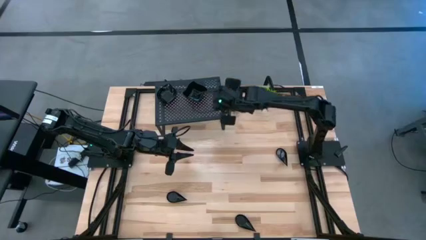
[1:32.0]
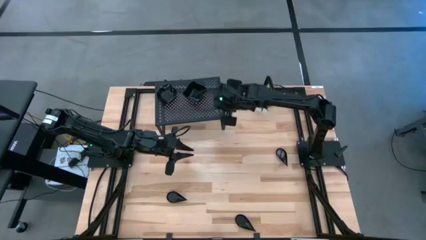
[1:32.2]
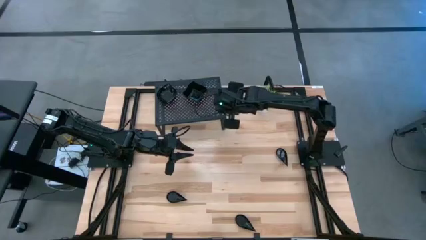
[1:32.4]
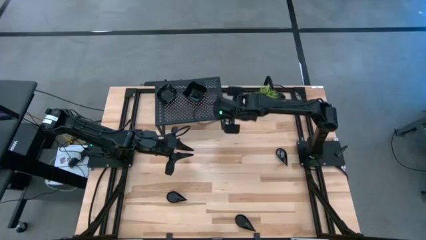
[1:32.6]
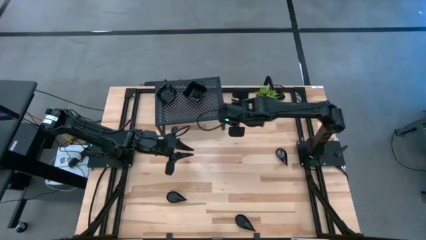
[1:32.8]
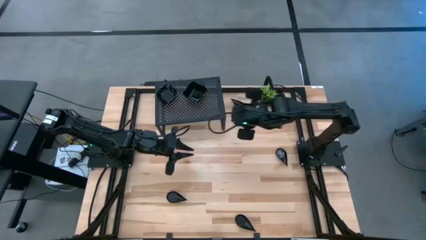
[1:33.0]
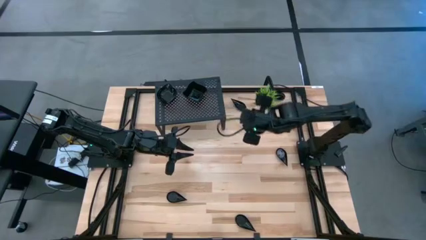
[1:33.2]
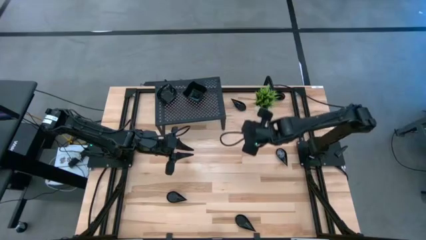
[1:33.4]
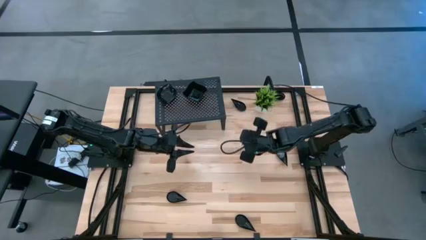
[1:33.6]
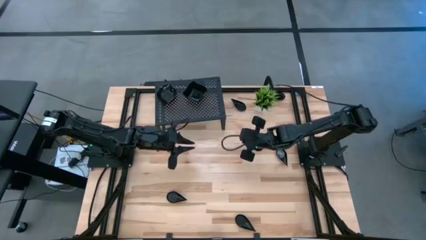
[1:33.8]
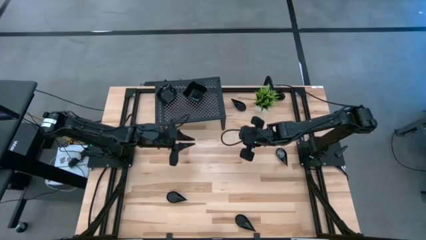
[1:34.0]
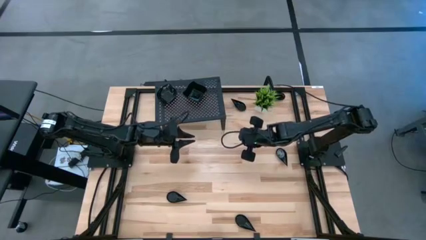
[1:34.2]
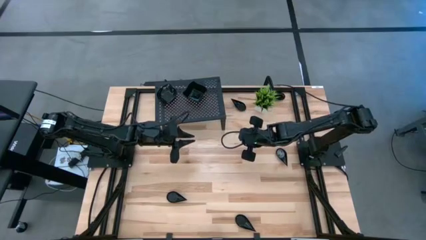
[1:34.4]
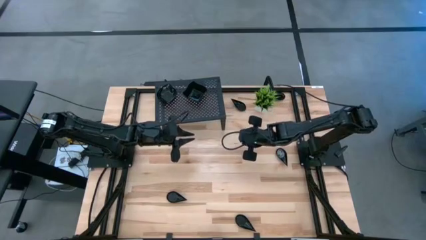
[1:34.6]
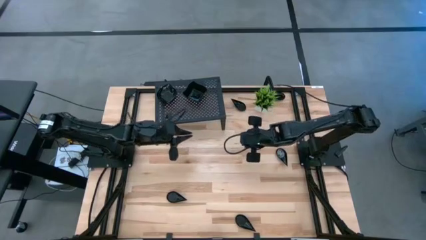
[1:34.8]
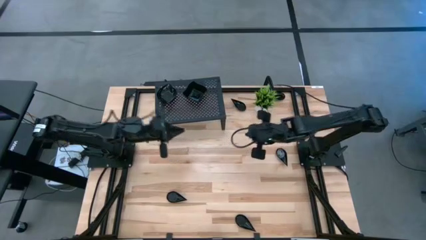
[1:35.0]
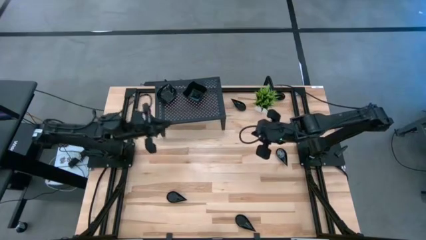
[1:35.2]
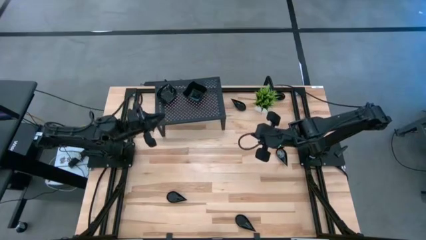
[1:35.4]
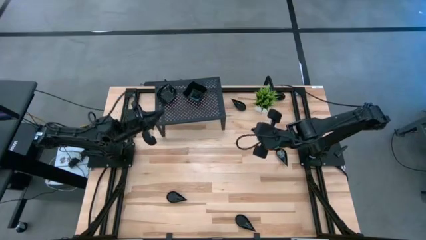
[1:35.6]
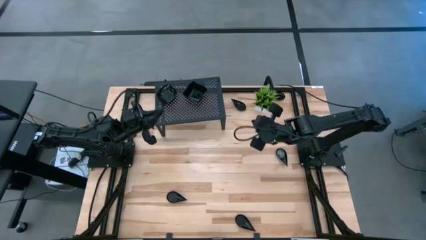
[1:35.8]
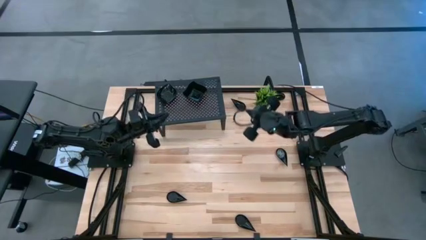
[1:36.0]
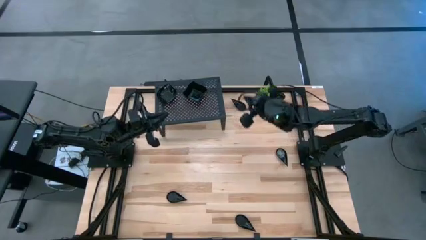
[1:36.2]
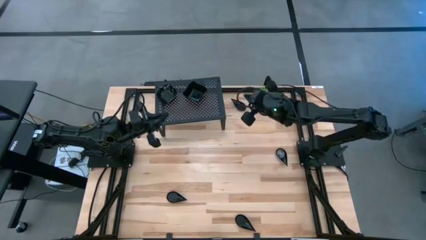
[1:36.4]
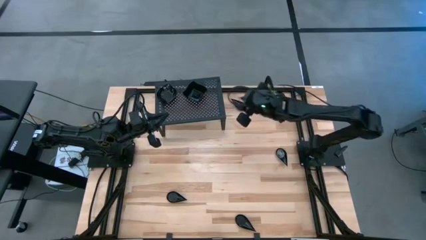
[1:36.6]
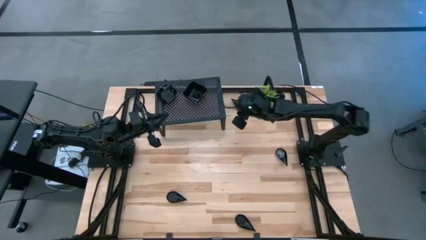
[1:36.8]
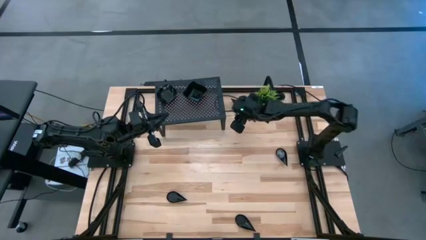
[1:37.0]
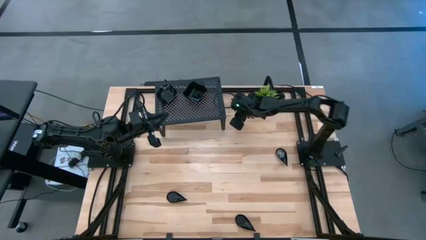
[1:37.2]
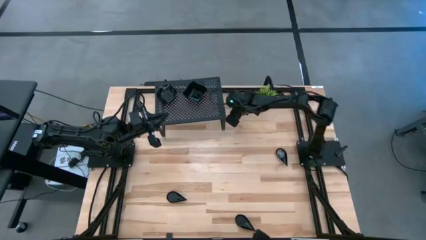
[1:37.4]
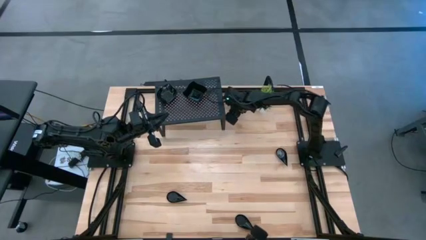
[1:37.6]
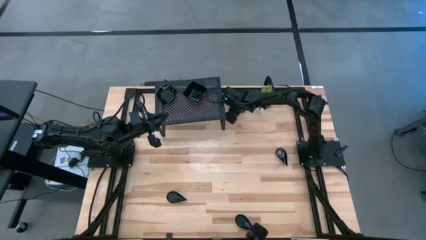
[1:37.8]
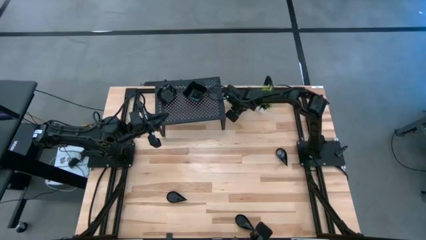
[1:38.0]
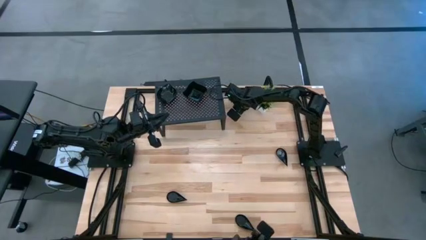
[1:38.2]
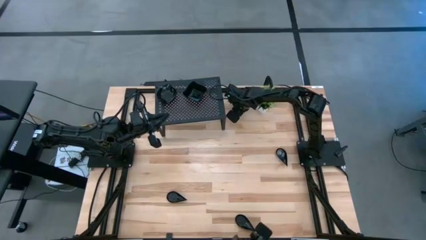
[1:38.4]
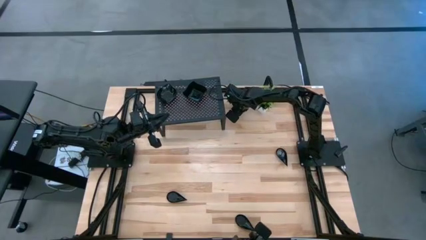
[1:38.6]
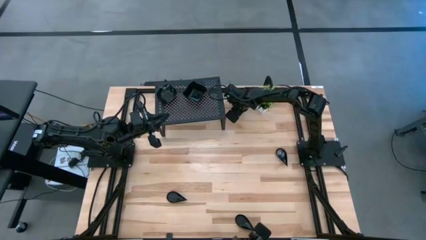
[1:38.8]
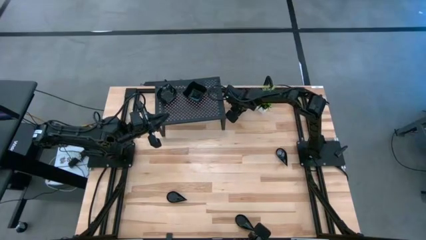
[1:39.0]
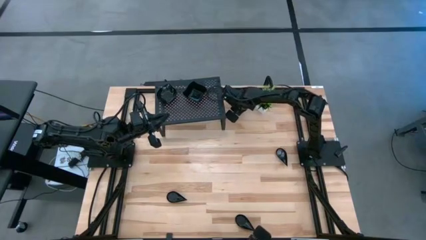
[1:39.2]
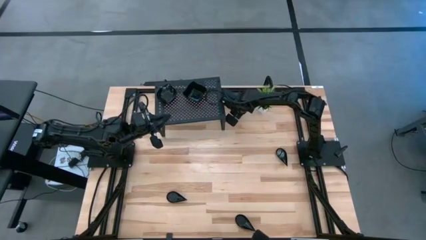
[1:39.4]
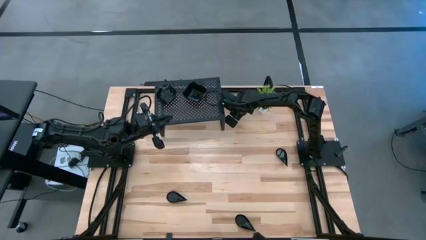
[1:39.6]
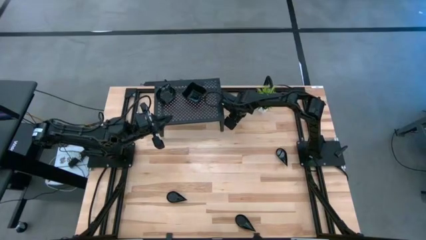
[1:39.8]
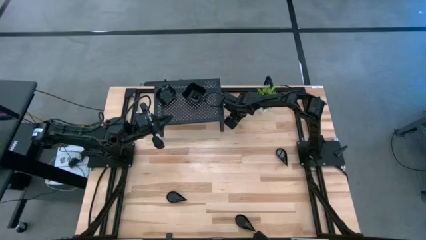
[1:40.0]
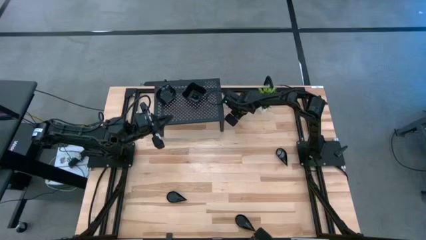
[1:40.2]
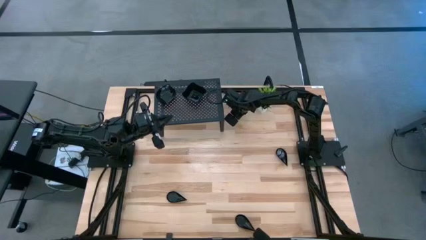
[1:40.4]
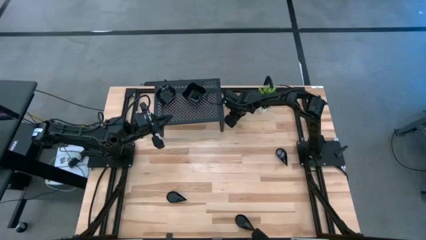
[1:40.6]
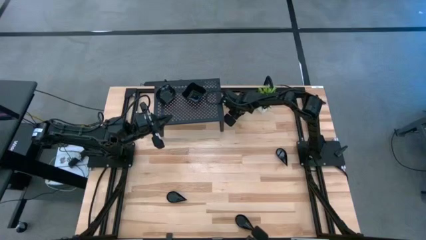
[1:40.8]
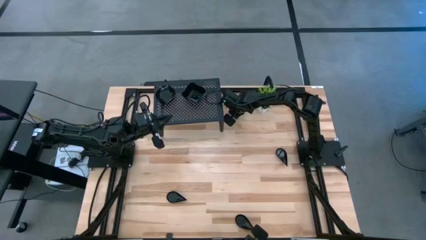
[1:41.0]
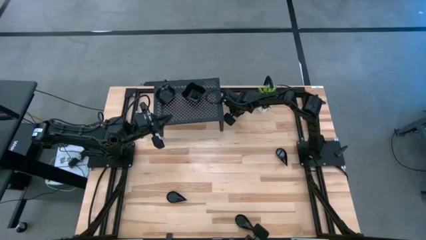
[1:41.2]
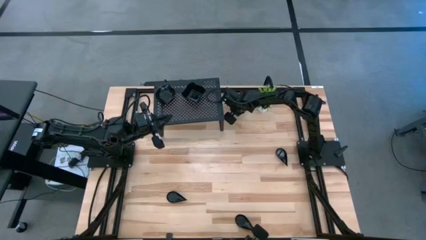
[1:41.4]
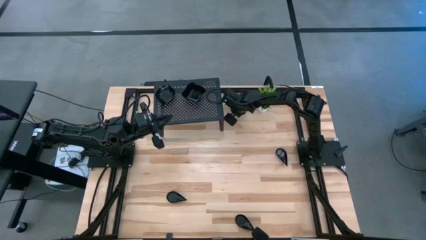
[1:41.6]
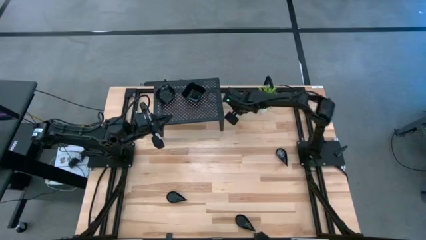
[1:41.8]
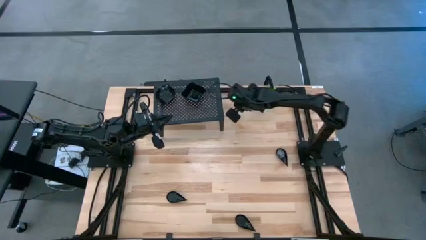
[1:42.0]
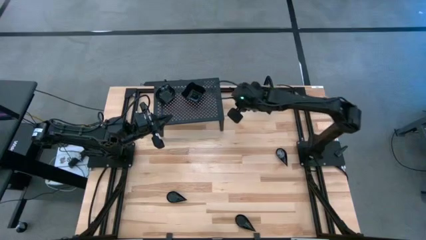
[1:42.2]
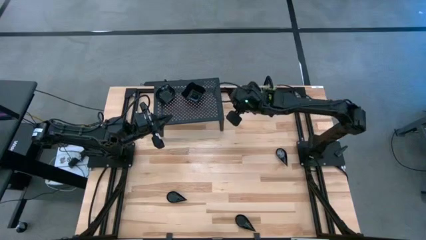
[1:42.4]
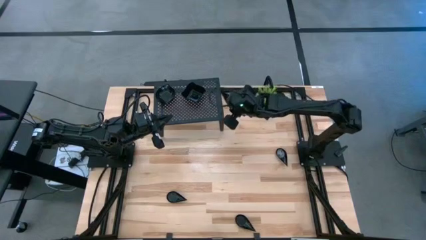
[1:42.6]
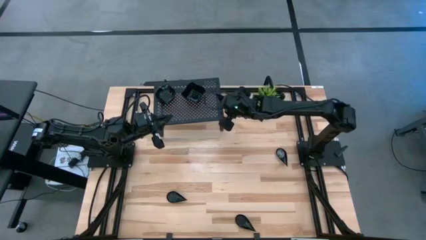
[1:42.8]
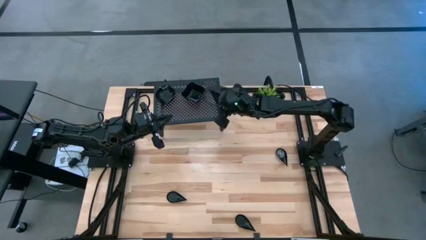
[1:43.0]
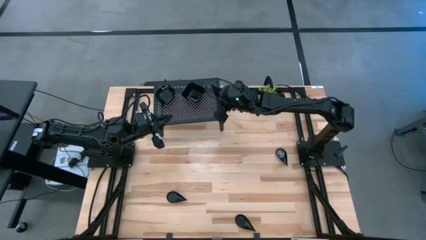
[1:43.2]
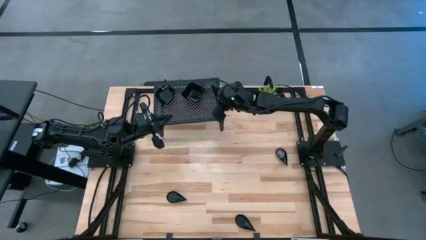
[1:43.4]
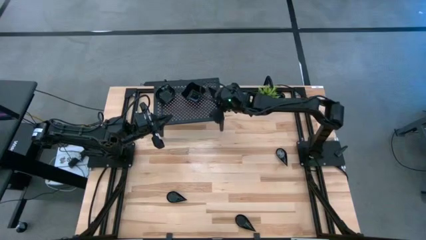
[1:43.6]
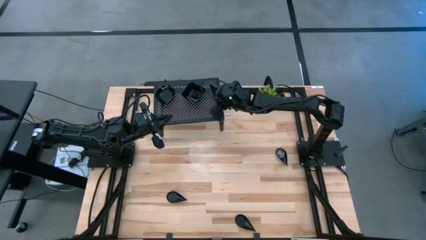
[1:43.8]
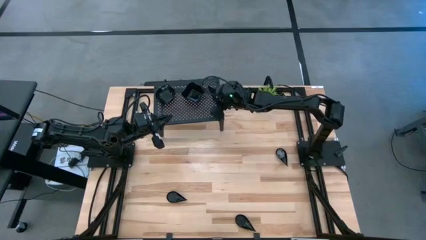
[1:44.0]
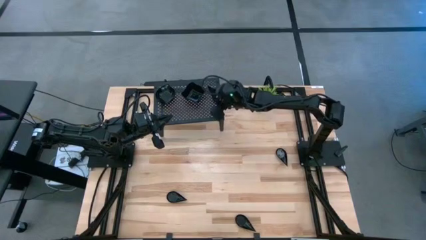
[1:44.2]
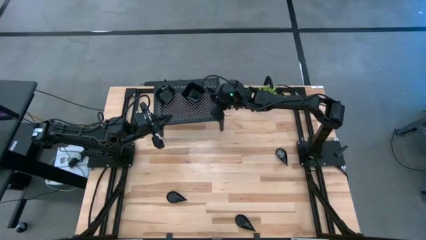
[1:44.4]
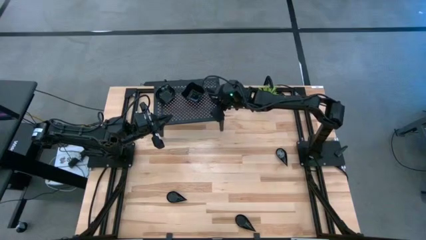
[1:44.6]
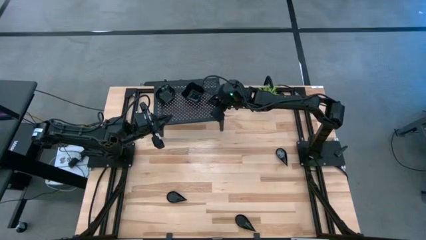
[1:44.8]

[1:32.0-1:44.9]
Task: Pick & Place Mini shaped plates
Put the black drop shaped plate on the shelf
